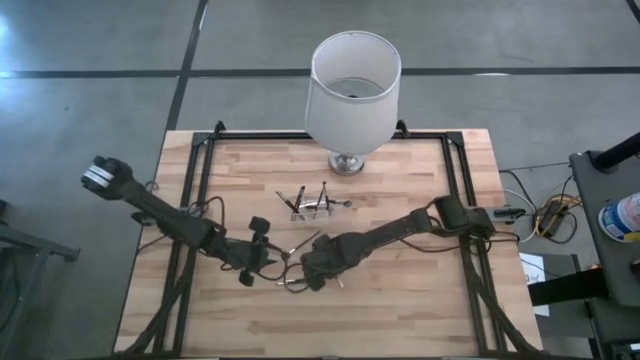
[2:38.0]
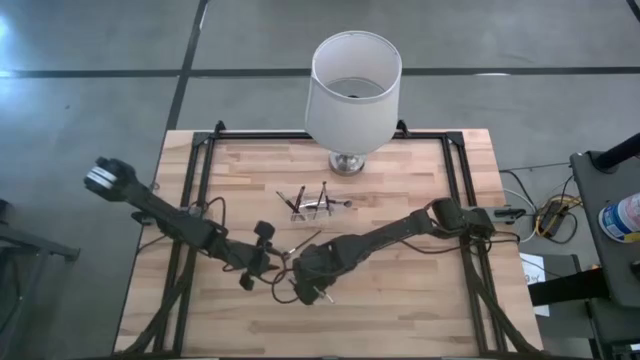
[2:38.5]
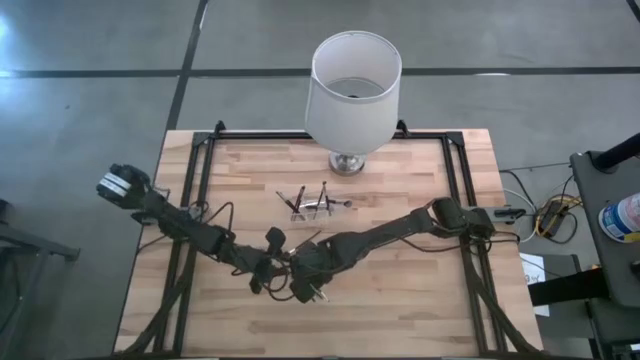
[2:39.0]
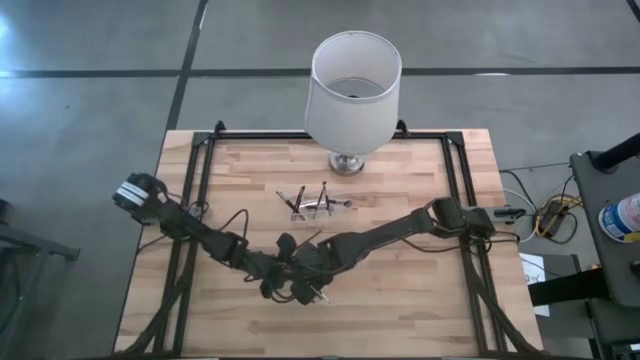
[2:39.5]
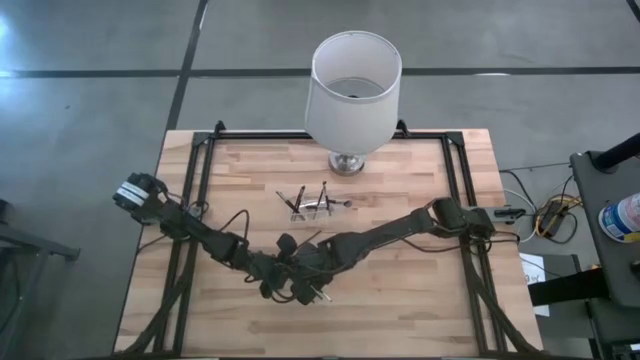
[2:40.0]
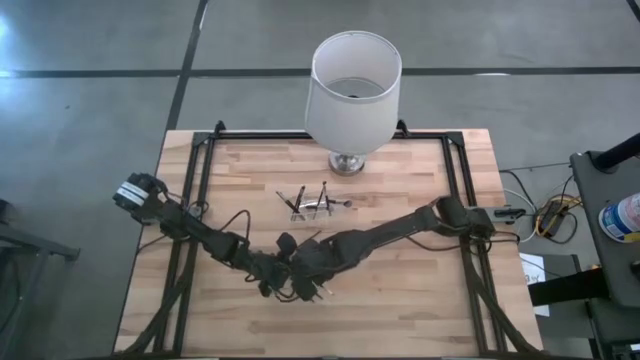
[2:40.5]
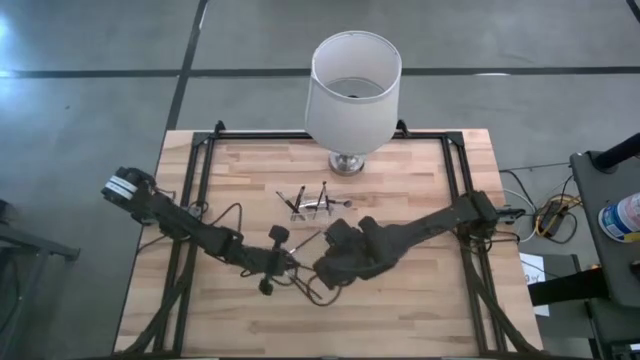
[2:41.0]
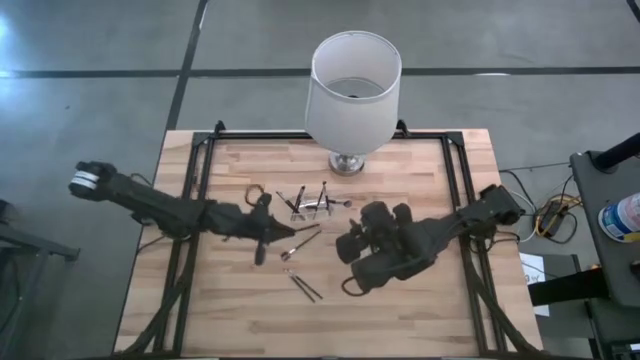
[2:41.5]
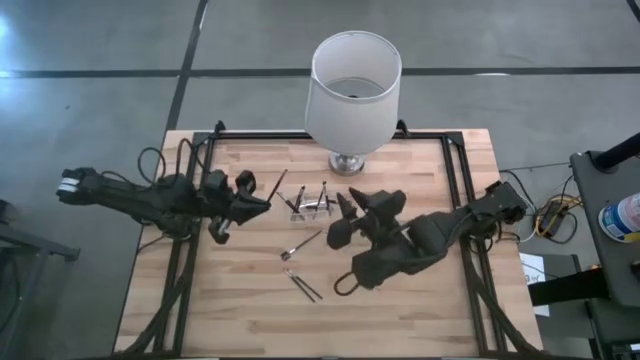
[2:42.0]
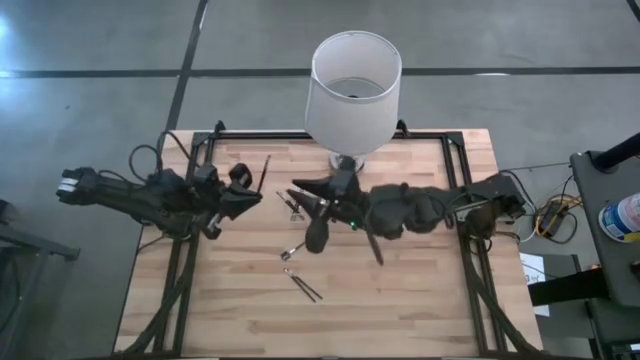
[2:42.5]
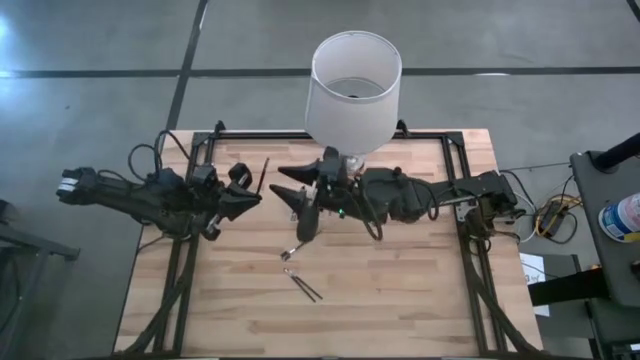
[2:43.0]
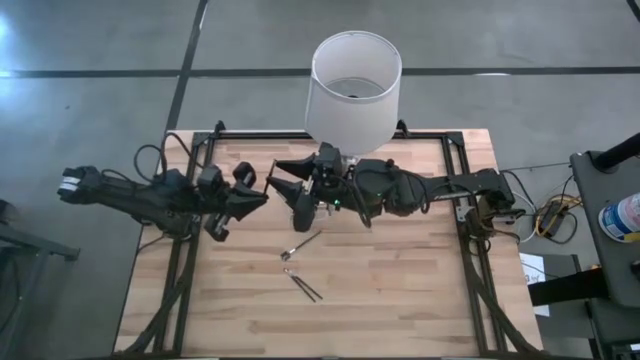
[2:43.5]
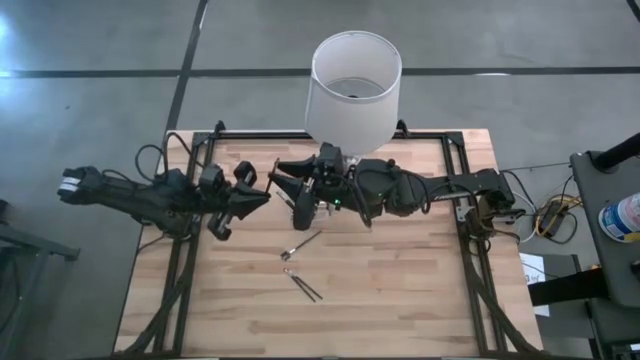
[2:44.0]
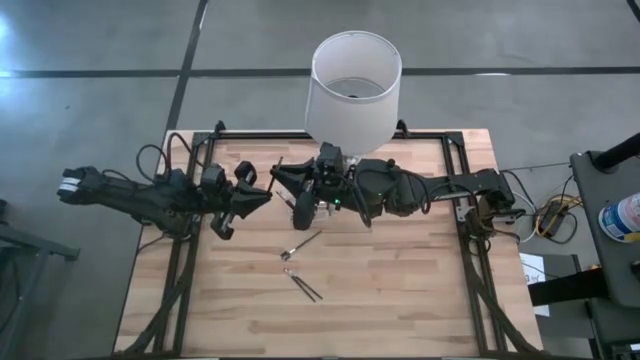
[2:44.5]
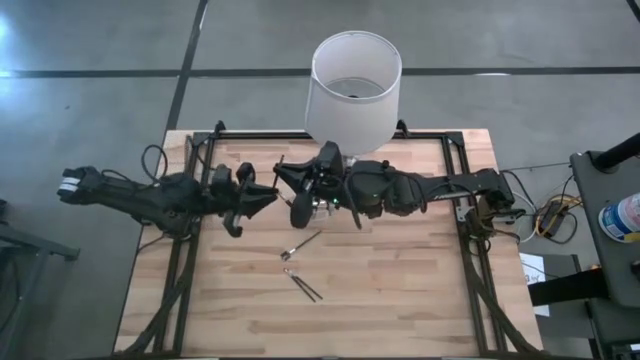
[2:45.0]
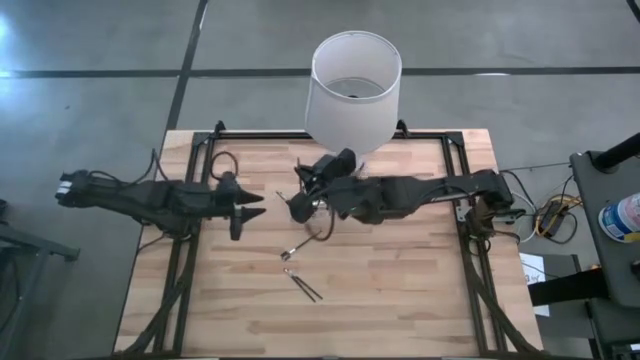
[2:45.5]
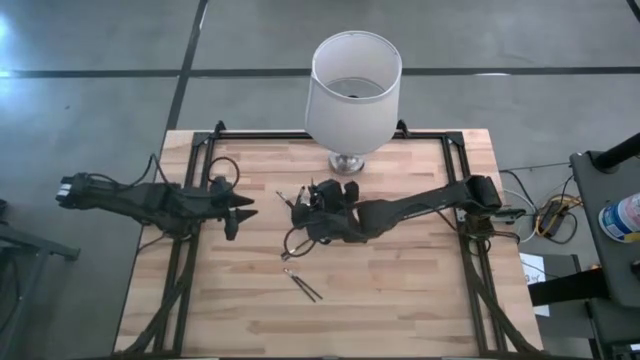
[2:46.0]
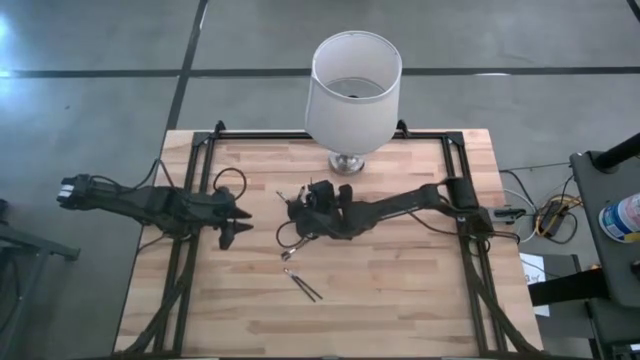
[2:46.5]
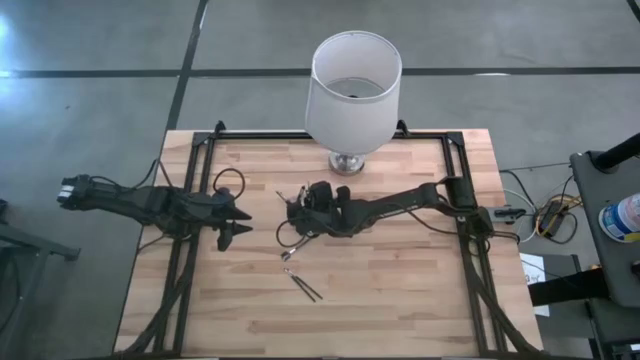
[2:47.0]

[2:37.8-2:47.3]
Task: Put items in baskets/containers
Put the eyeshadow brush into the transparent organizer

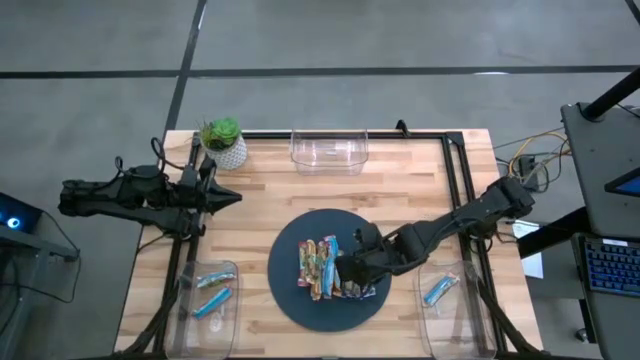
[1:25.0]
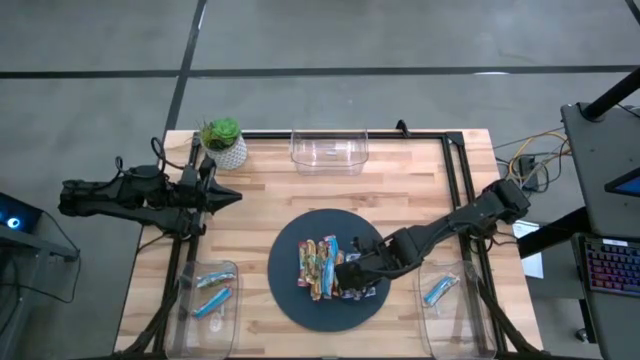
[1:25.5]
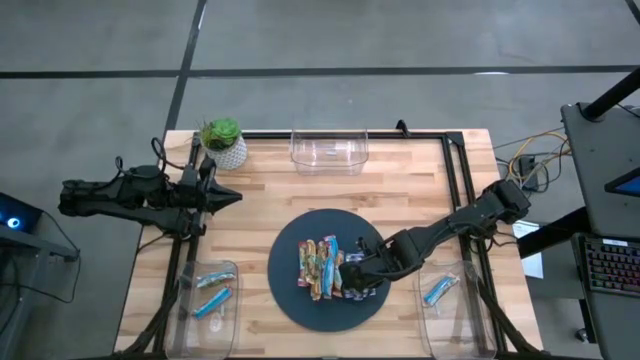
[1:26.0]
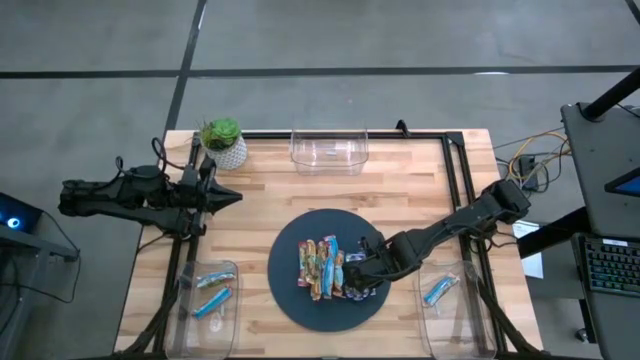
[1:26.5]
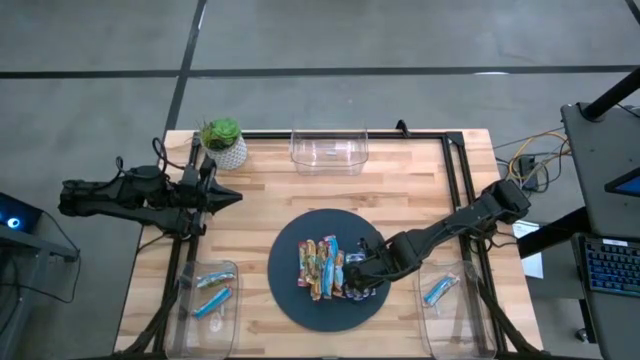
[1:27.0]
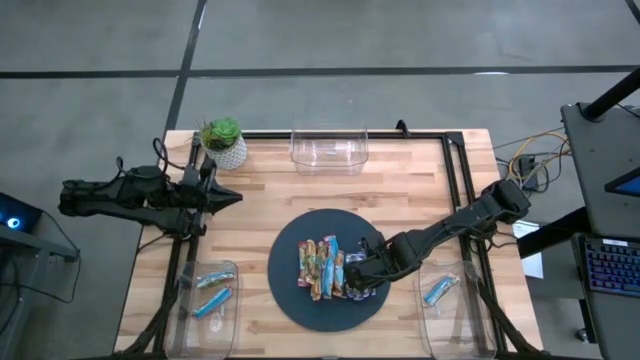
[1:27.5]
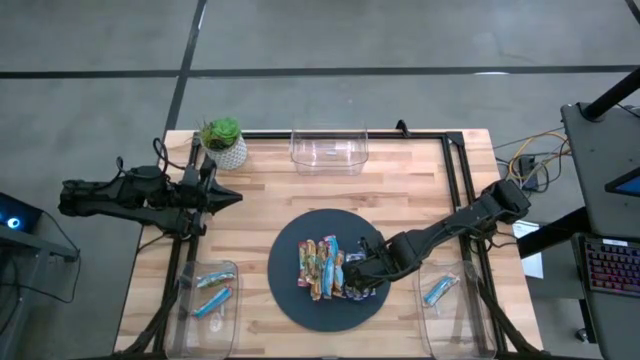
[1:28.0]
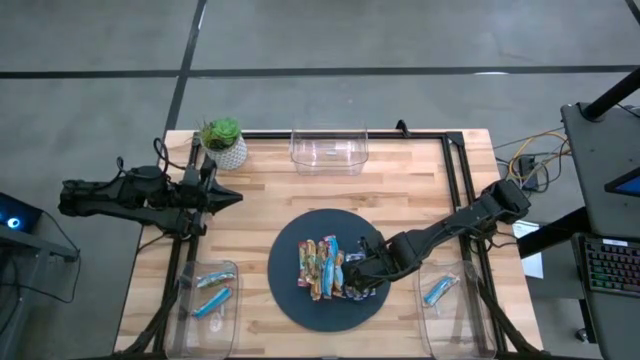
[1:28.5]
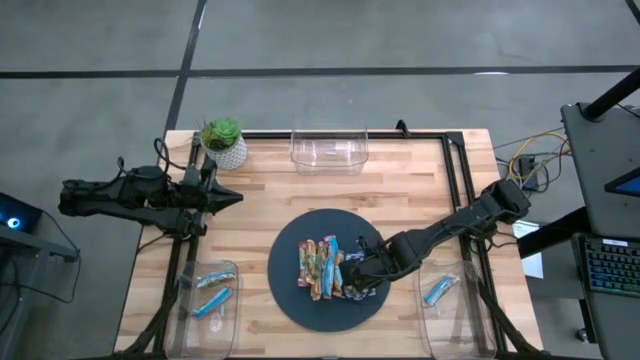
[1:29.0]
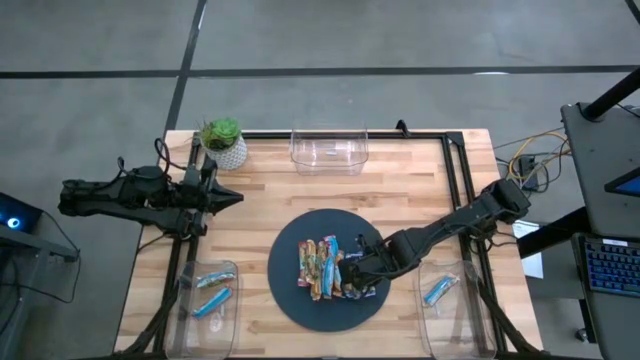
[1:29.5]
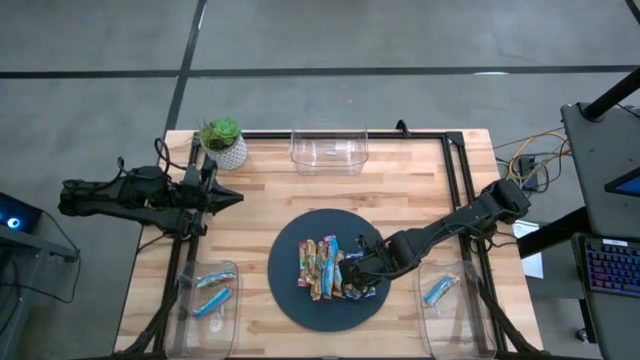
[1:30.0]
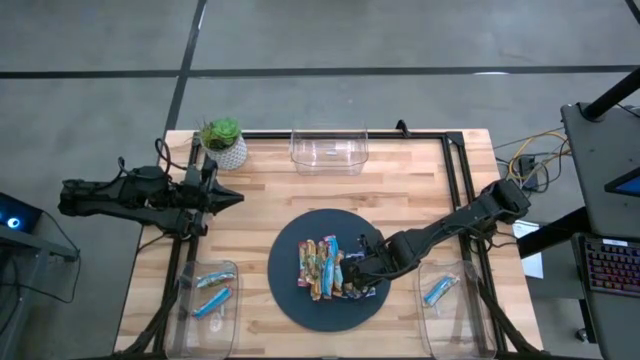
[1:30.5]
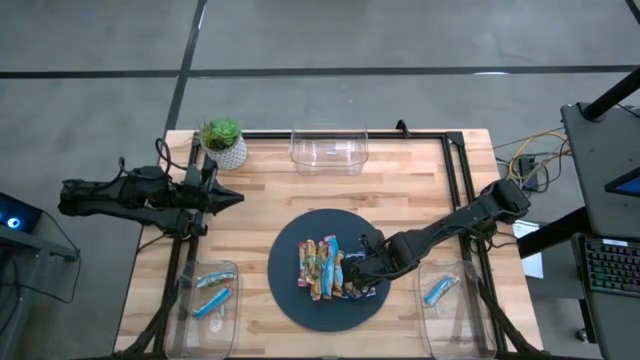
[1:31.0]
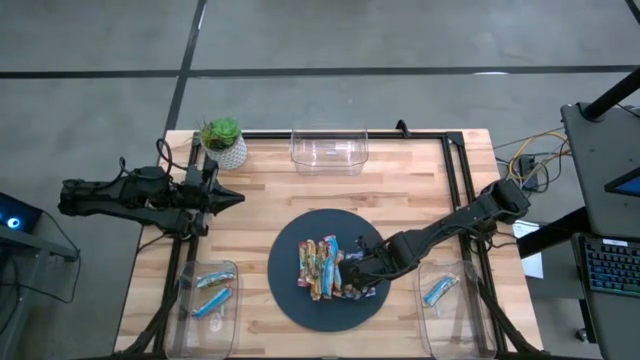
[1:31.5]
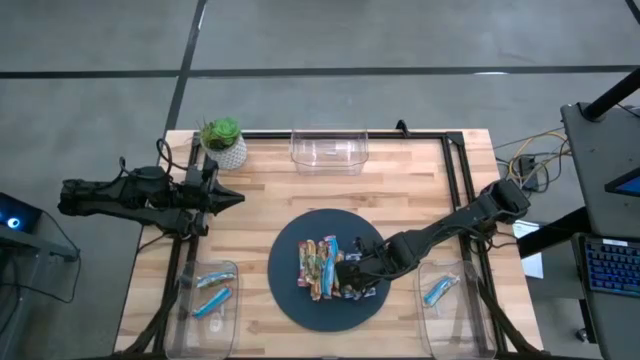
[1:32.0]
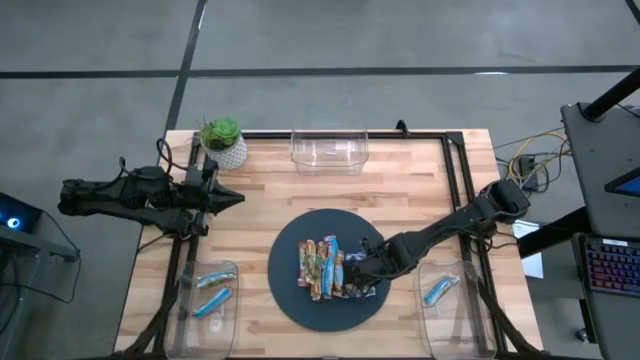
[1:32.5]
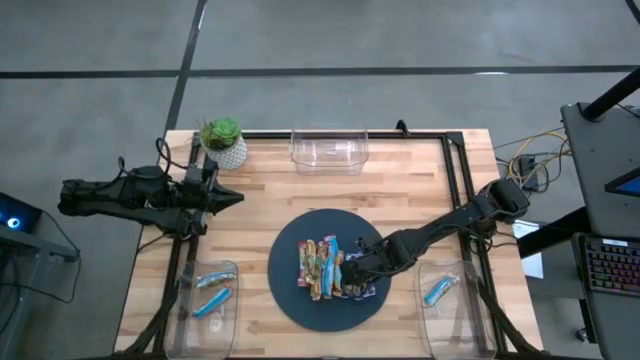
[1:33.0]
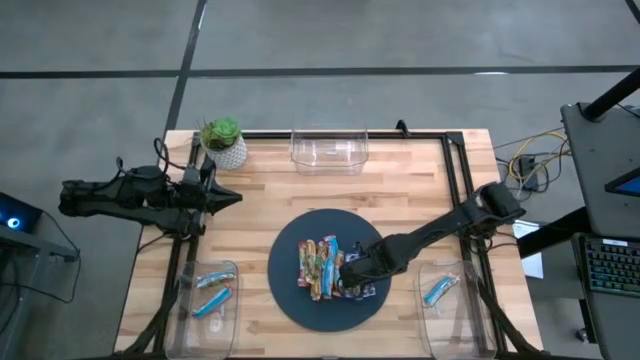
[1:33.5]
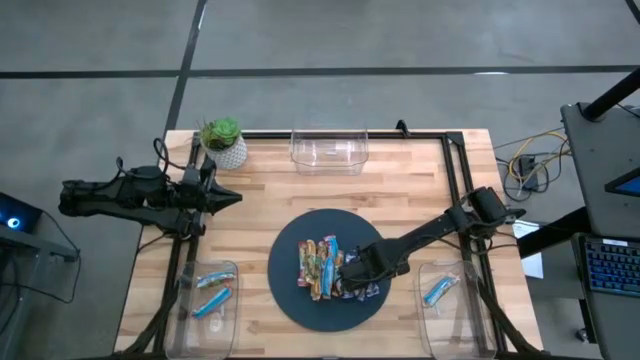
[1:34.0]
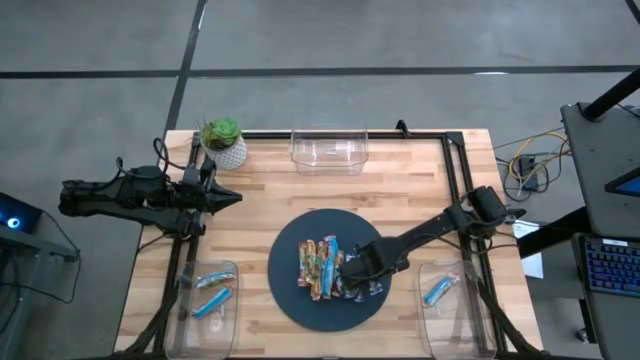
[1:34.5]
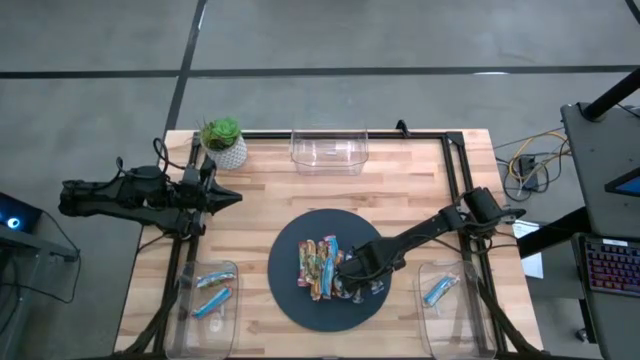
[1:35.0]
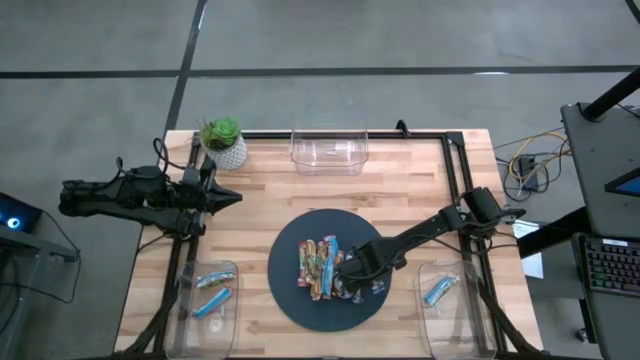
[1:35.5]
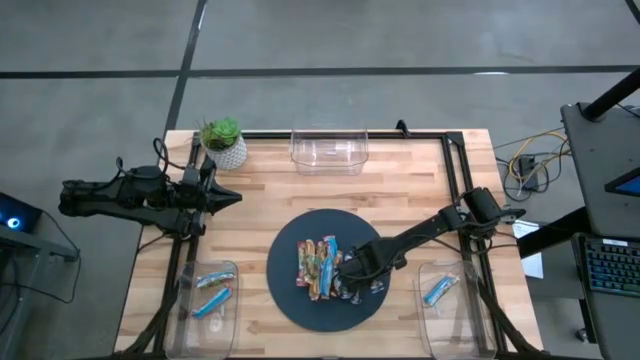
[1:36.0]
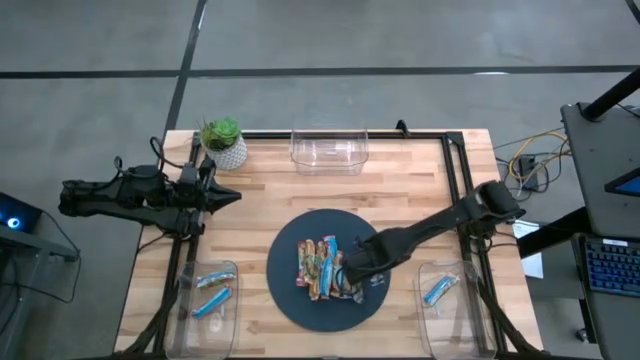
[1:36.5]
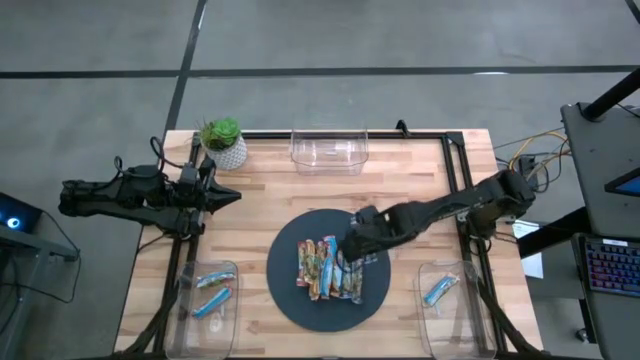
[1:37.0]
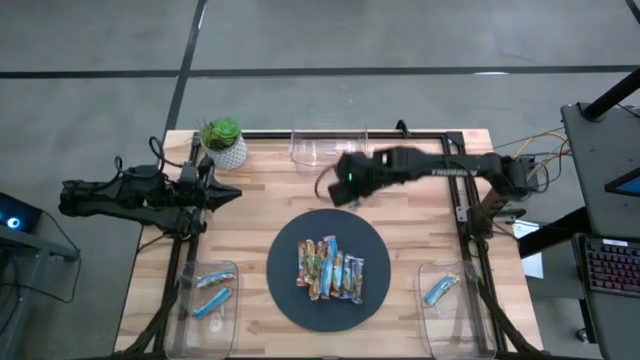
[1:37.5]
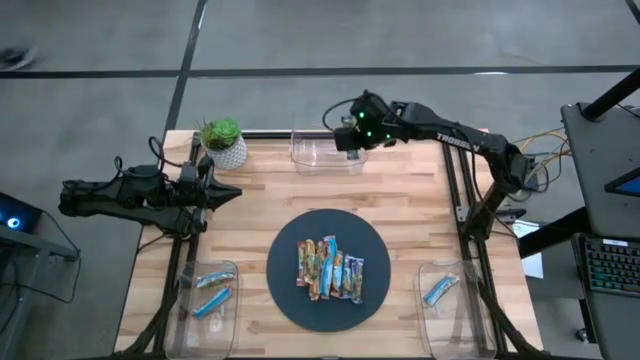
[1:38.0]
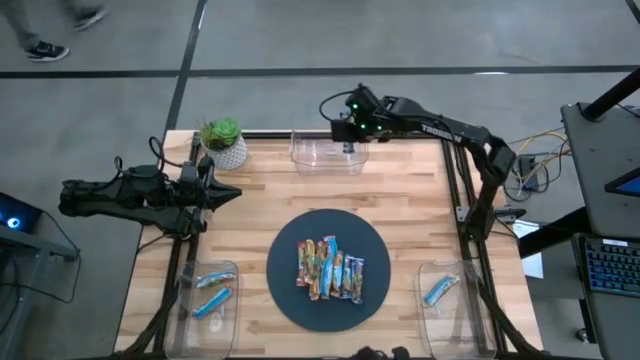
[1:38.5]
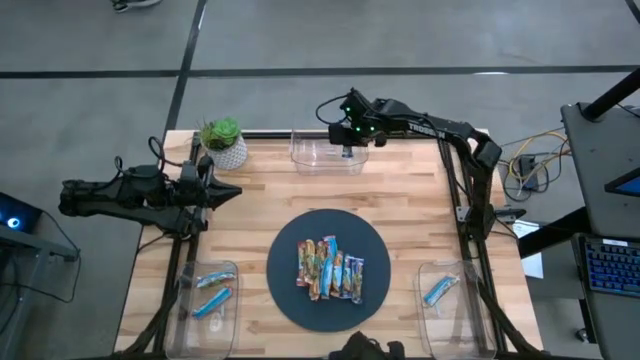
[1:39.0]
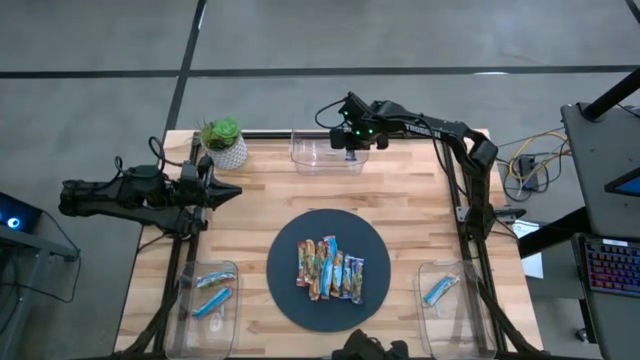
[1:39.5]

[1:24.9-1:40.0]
Task: Pick and place Granola Bars by type
Put the blue granola bar into the top transparent bin
